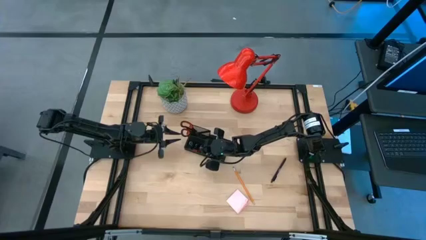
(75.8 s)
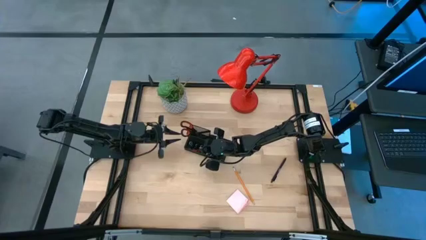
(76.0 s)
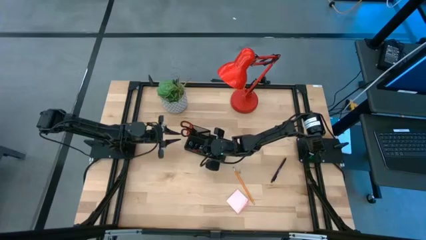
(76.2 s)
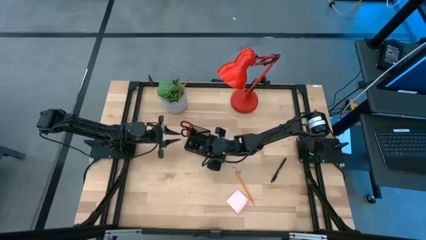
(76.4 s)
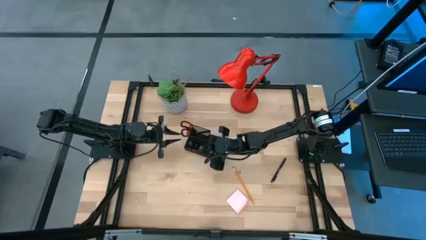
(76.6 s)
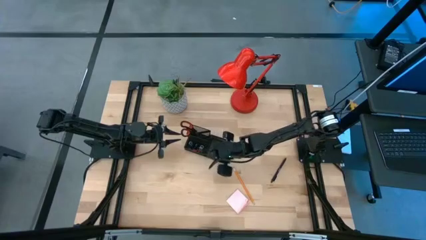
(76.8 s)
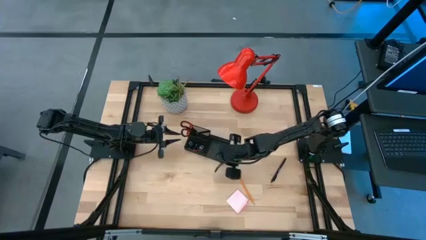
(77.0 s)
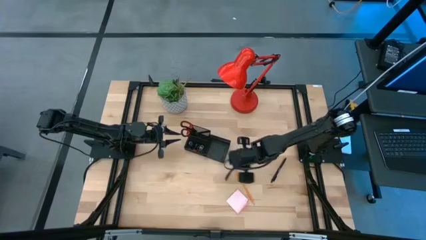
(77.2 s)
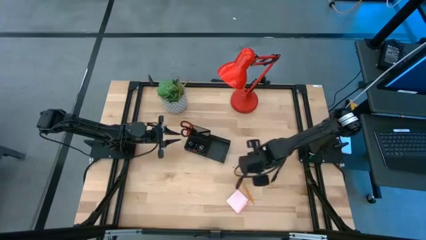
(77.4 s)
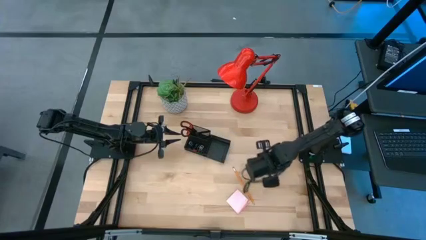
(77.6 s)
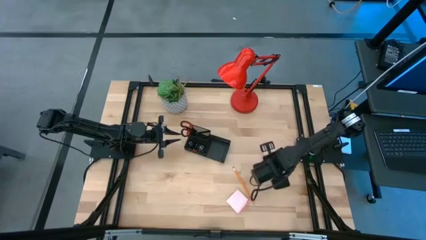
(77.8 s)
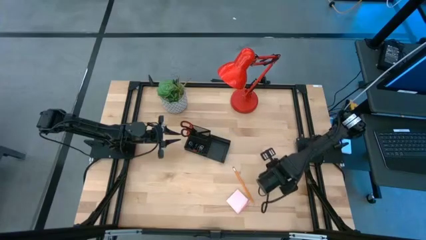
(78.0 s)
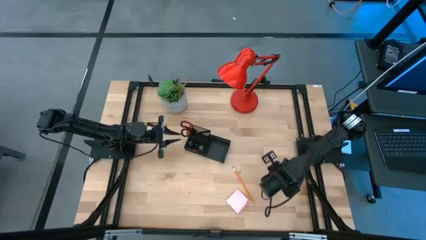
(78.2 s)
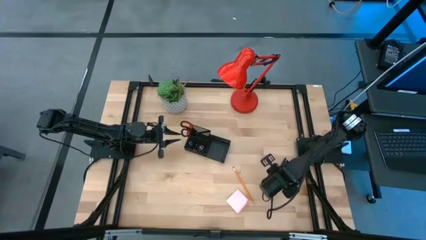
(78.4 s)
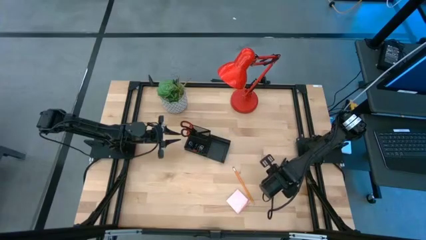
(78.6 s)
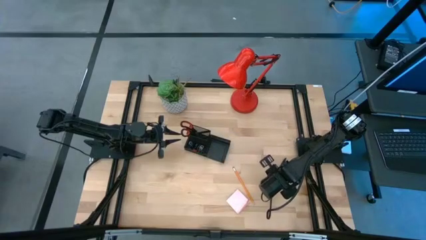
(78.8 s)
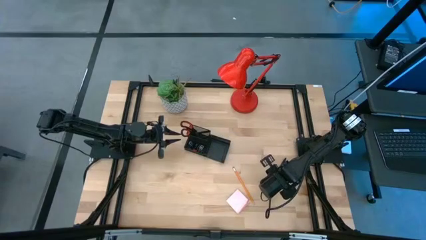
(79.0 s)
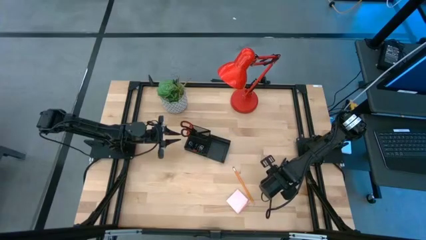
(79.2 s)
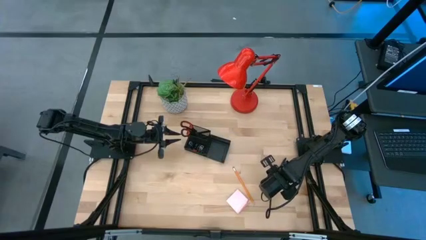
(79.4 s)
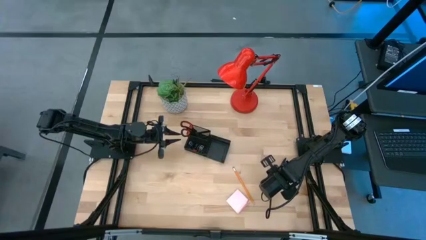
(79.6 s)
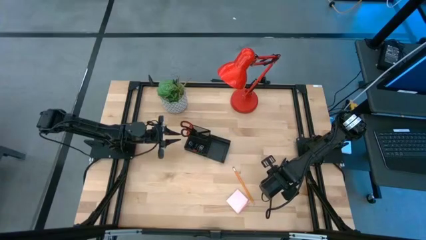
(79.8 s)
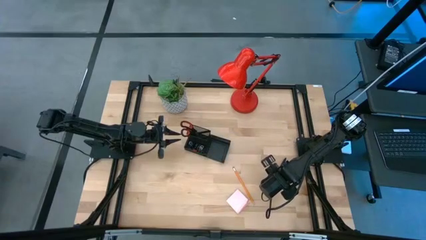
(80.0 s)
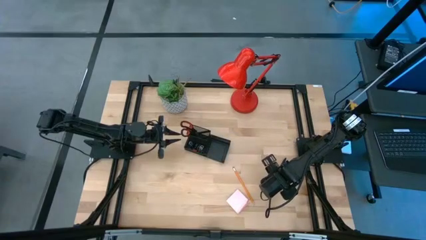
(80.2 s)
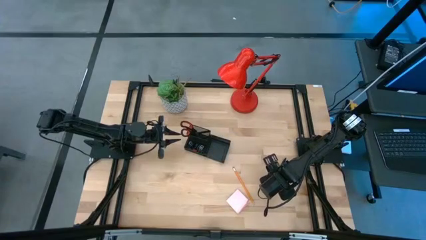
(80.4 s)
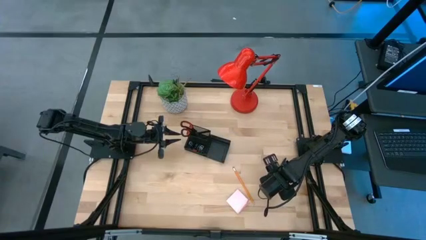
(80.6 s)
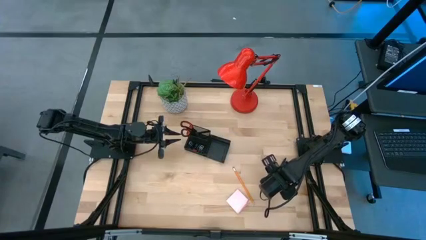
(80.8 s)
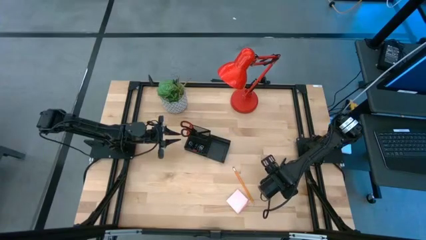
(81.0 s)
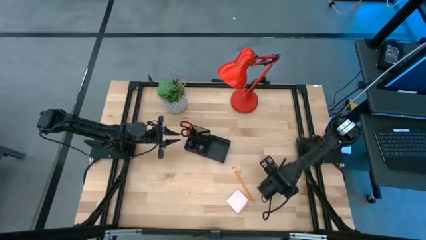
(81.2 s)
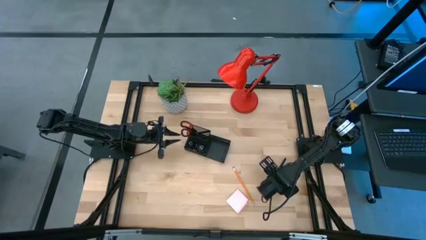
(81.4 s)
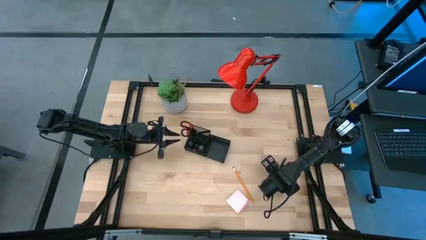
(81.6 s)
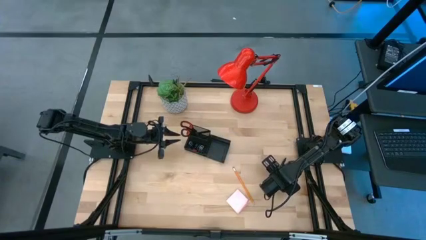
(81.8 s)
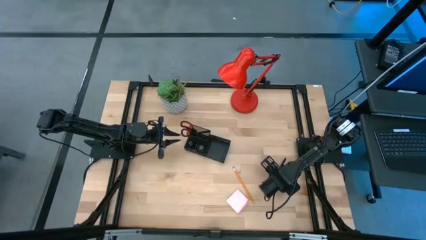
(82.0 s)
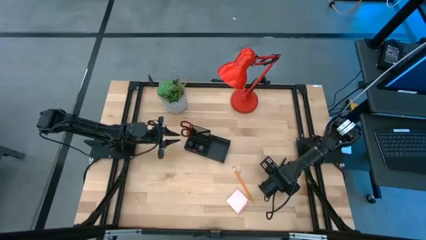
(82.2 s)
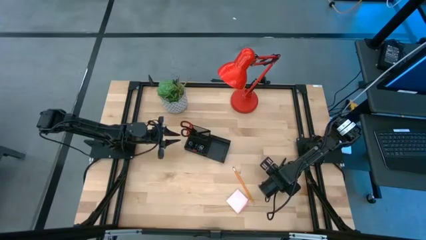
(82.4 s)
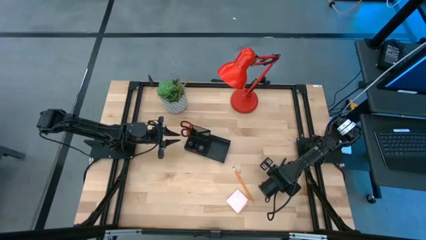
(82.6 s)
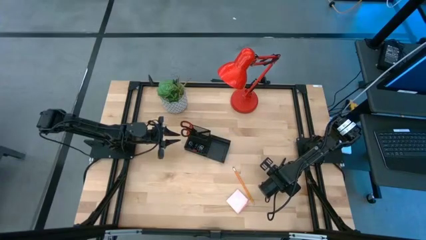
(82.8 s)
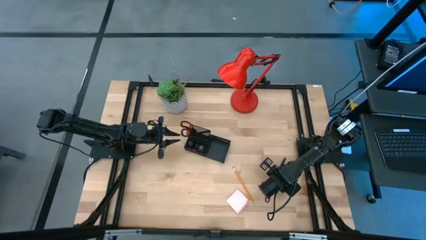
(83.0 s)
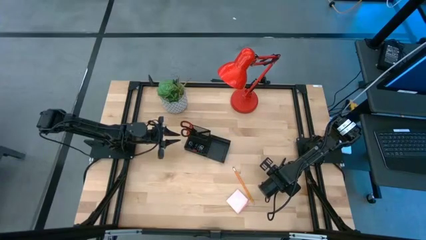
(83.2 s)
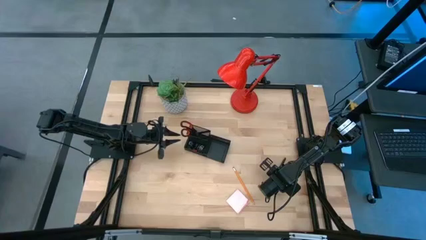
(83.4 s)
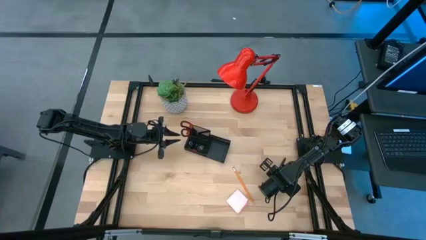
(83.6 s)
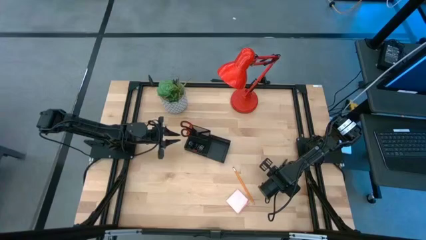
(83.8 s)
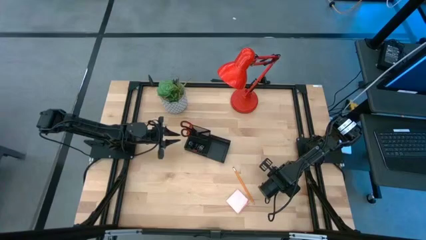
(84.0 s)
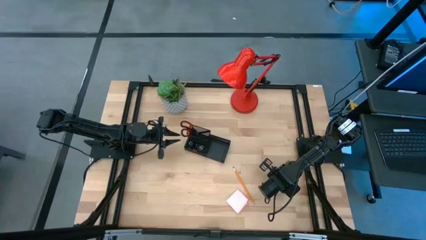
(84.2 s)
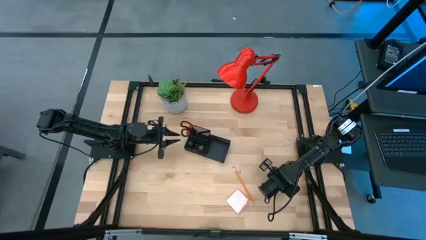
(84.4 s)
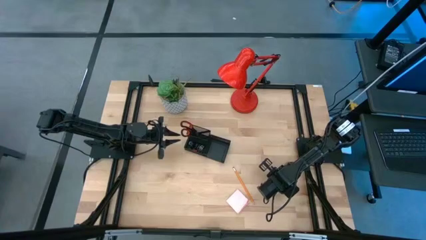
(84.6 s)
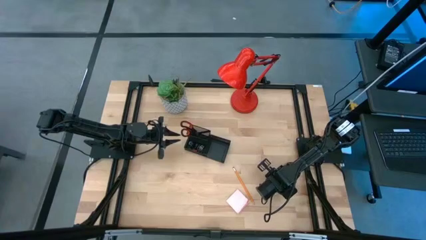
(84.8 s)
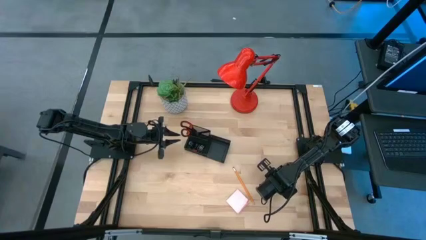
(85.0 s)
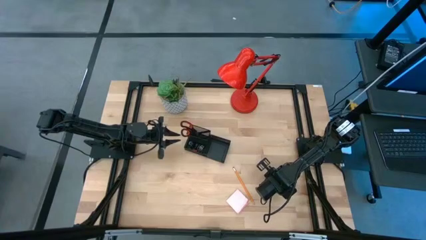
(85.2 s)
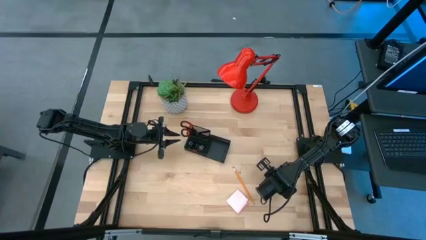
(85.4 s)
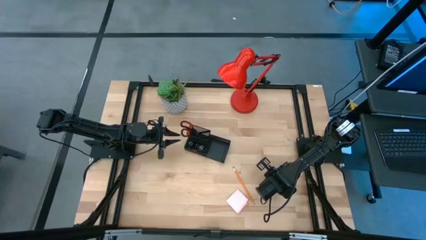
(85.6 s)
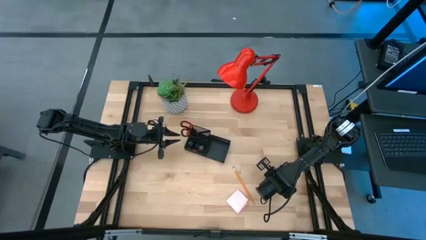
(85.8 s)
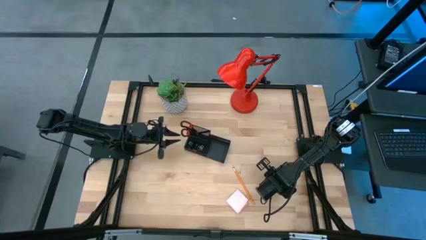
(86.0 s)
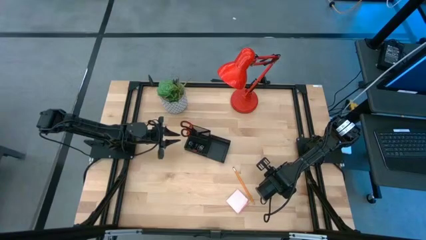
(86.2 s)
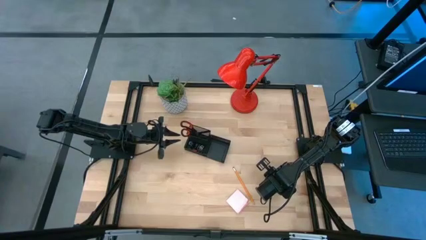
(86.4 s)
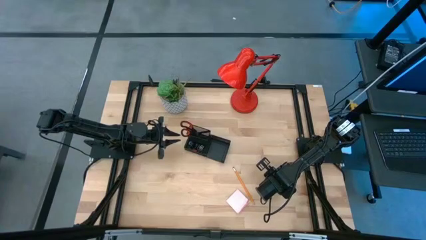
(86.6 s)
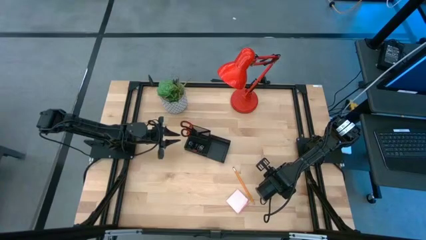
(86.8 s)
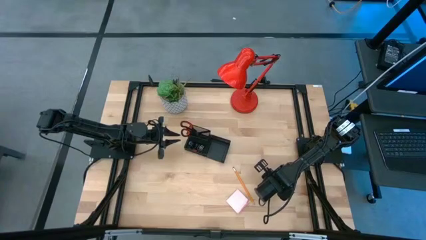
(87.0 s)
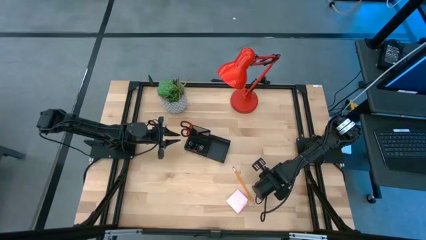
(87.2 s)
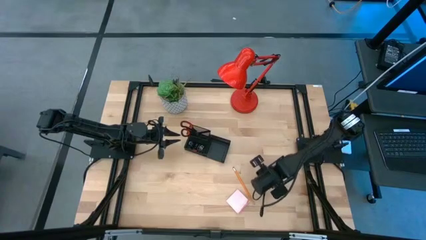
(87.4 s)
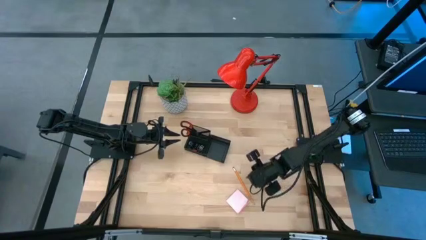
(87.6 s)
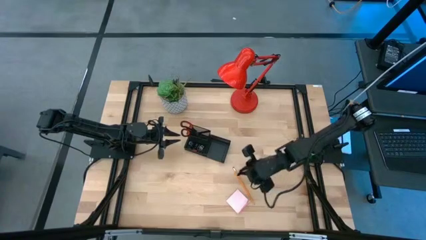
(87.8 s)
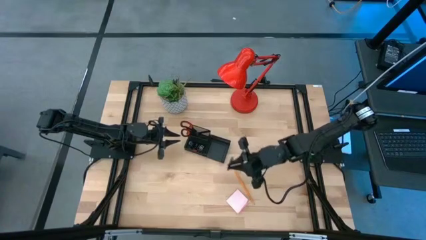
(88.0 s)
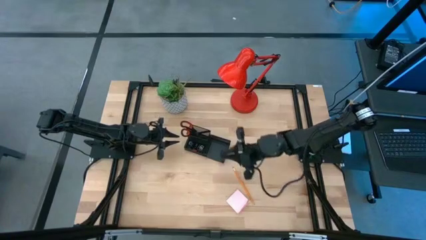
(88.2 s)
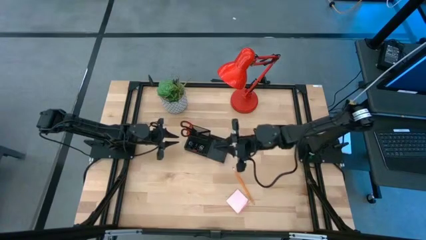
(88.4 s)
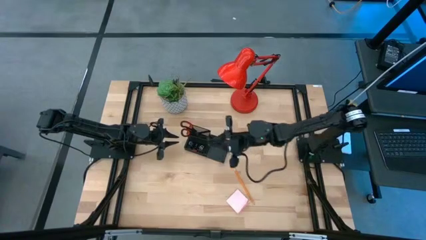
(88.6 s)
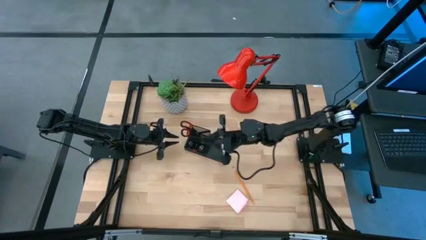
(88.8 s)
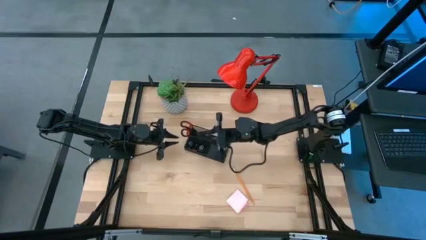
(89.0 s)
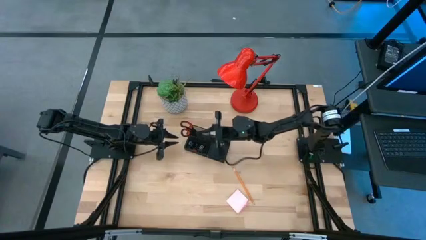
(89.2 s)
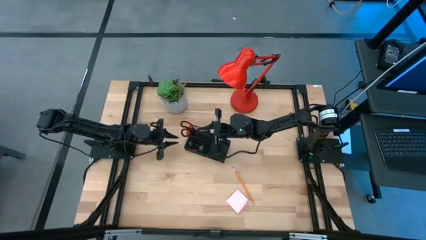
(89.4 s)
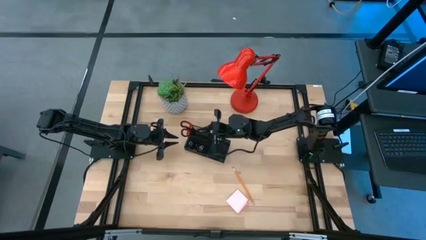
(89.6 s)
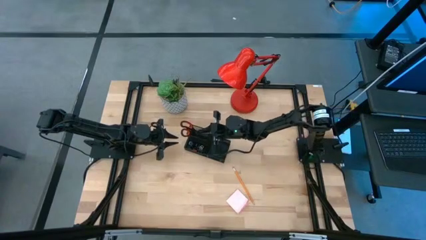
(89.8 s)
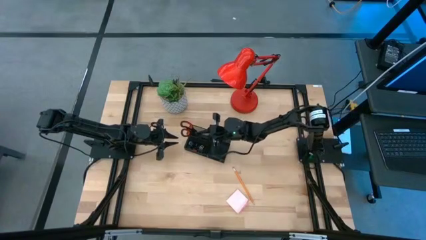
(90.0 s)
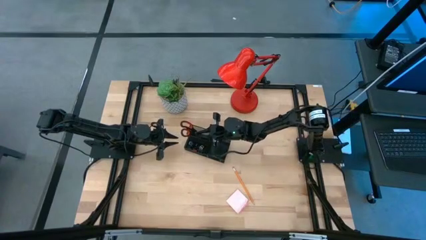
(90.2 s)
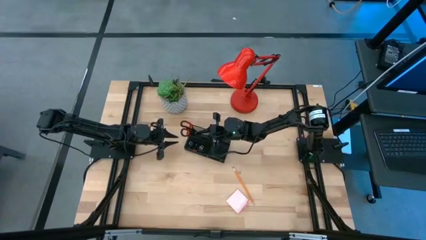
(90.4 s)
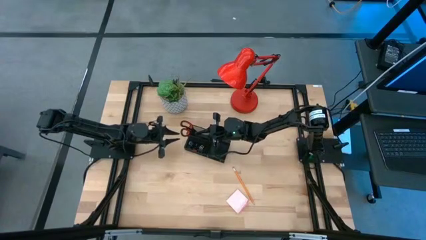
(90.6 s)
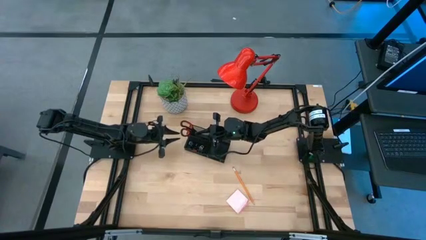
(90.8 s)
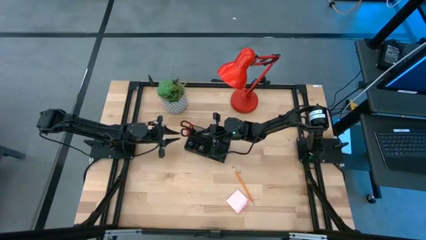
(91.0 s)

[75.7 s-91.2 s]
Task: Pick and place office supplies into organizer
Put the black pen into the black desk organizer
